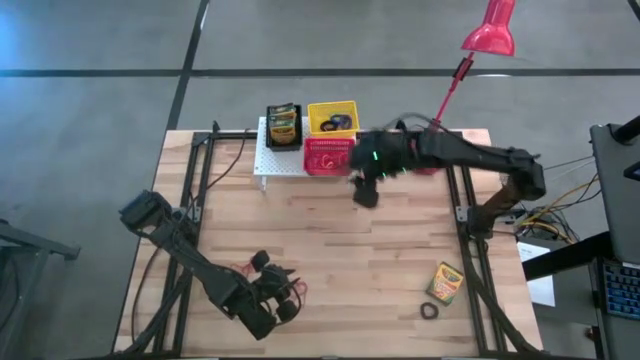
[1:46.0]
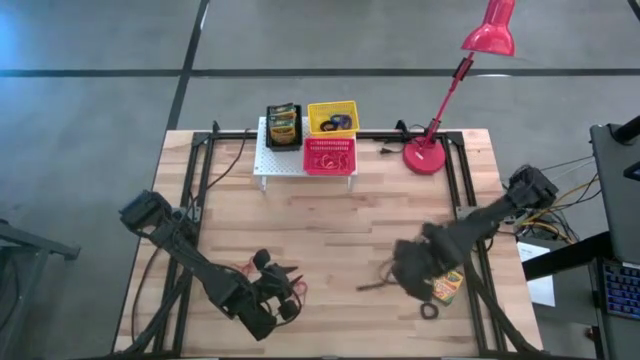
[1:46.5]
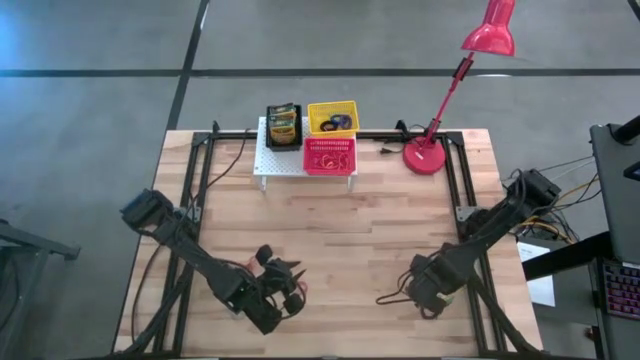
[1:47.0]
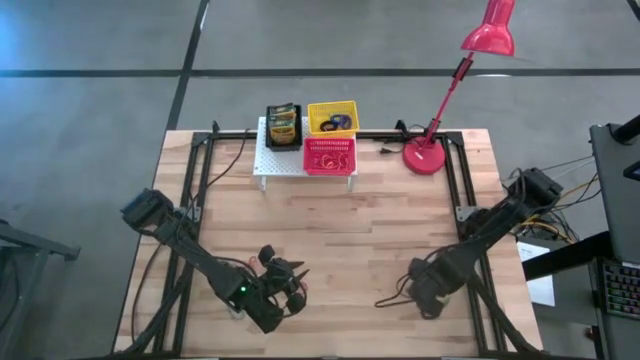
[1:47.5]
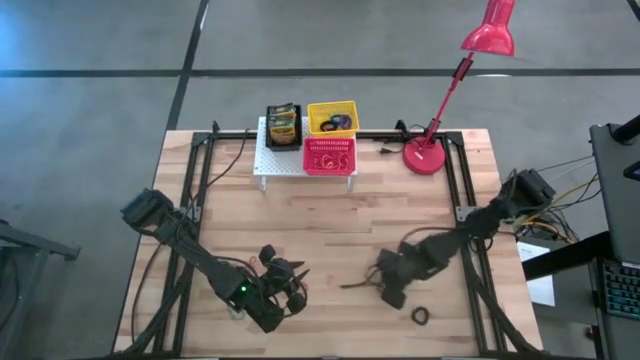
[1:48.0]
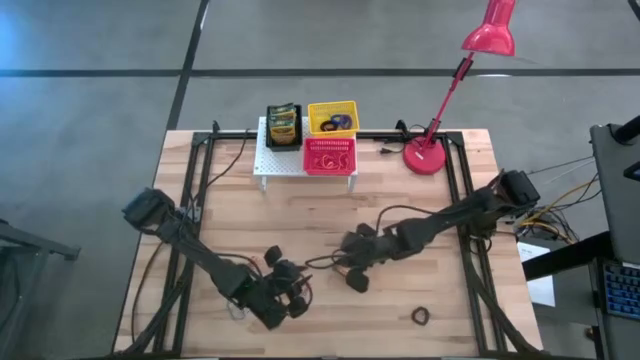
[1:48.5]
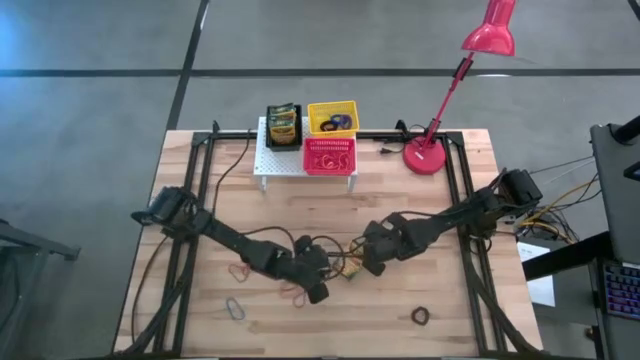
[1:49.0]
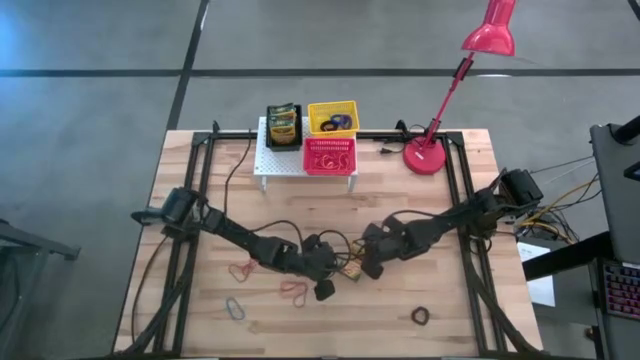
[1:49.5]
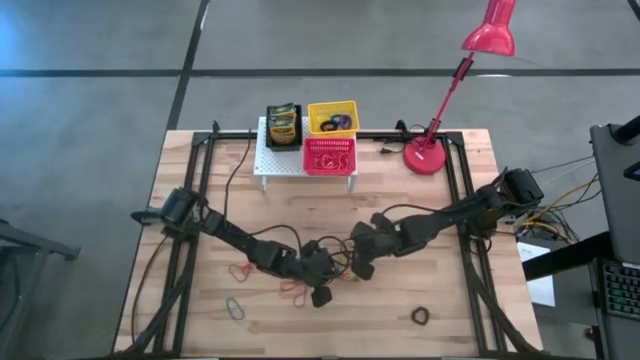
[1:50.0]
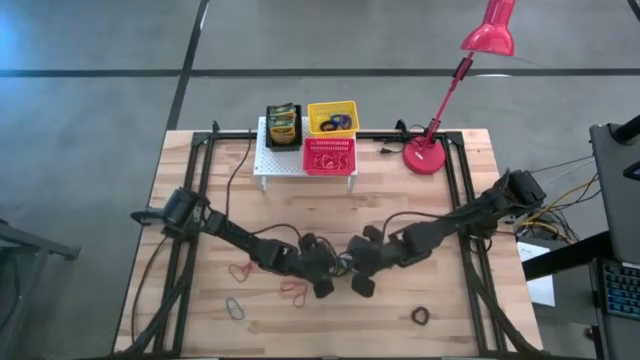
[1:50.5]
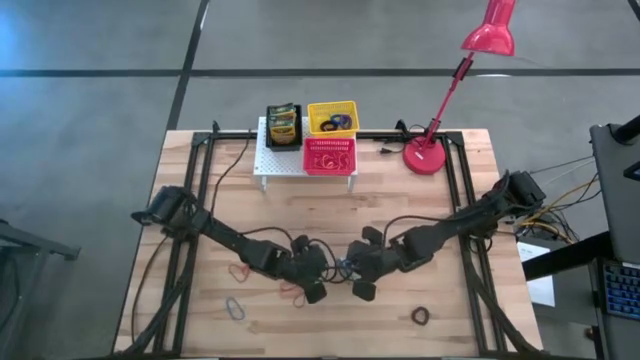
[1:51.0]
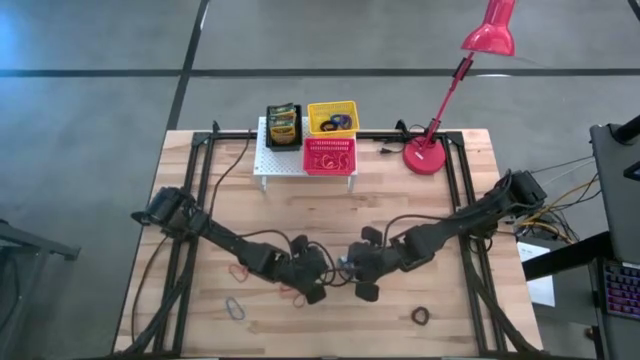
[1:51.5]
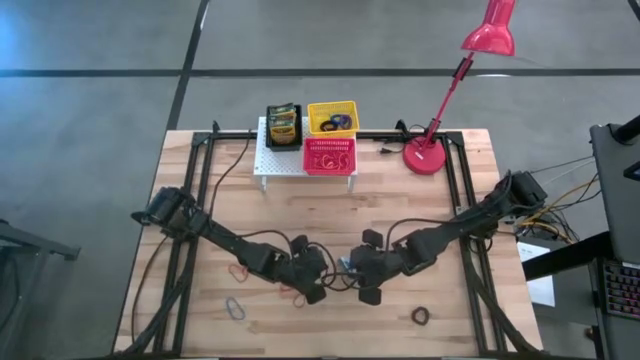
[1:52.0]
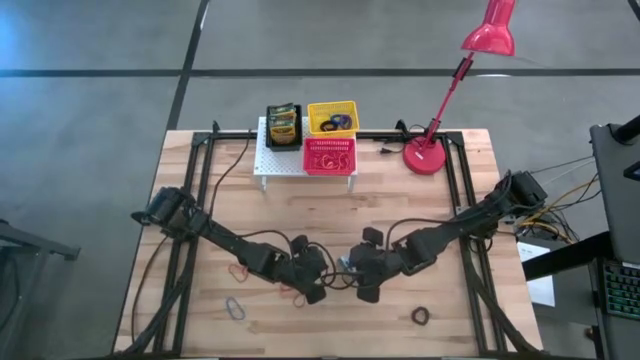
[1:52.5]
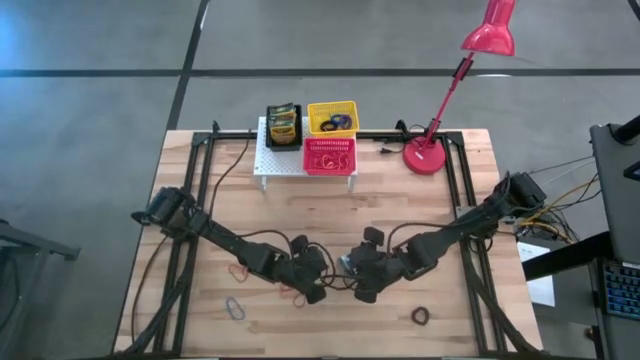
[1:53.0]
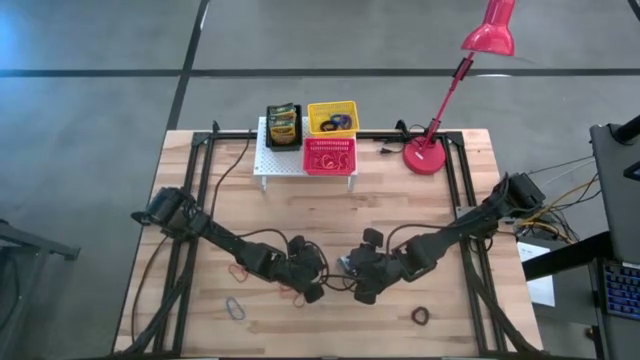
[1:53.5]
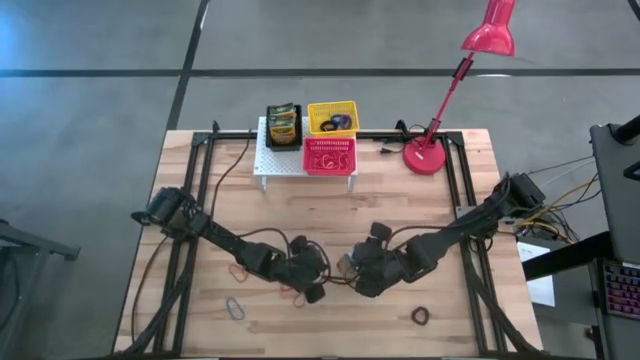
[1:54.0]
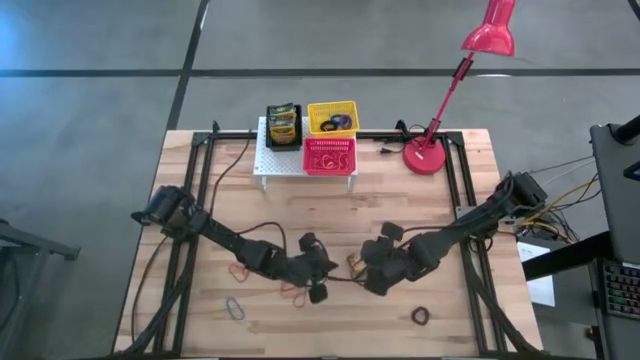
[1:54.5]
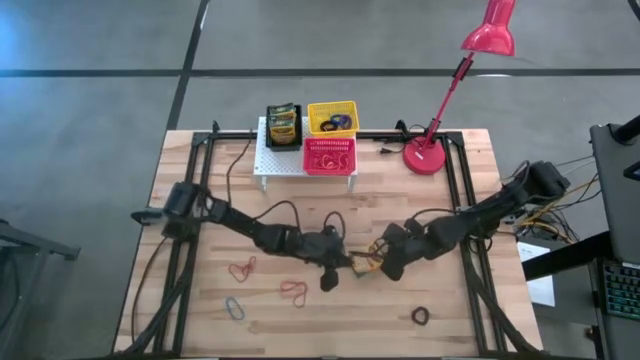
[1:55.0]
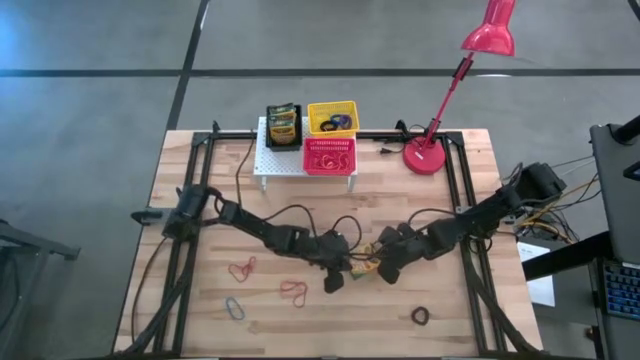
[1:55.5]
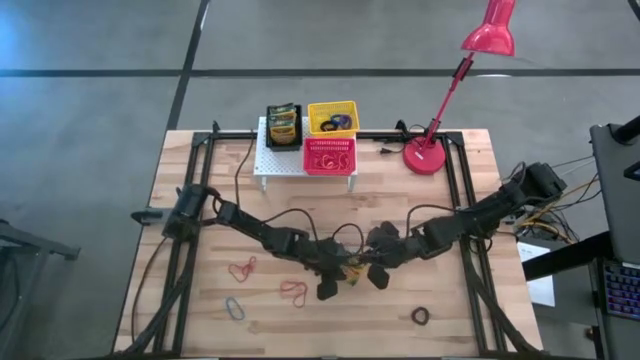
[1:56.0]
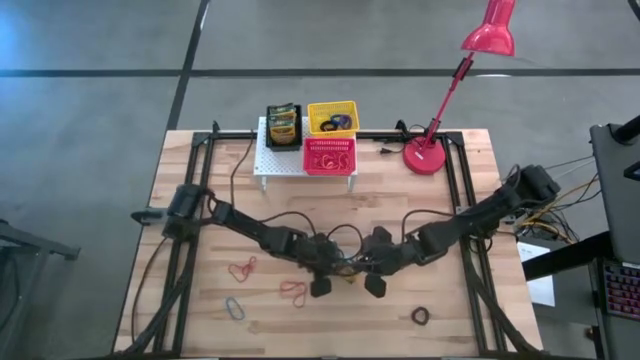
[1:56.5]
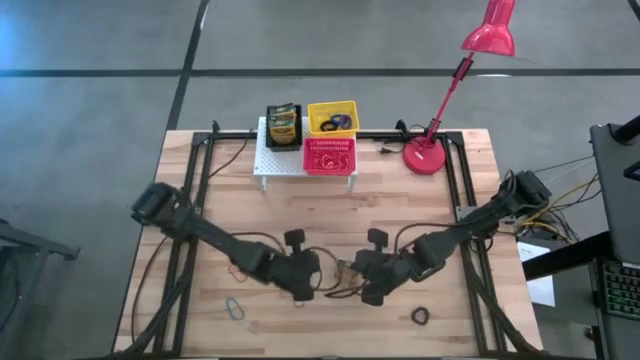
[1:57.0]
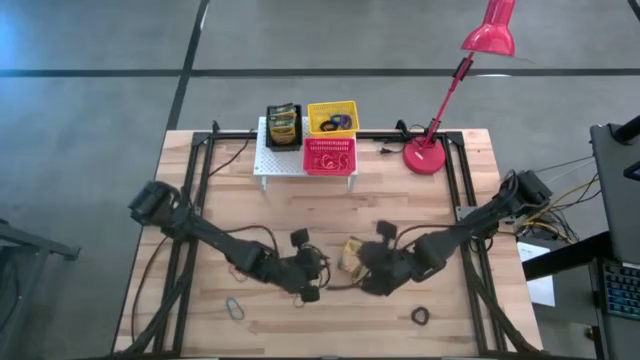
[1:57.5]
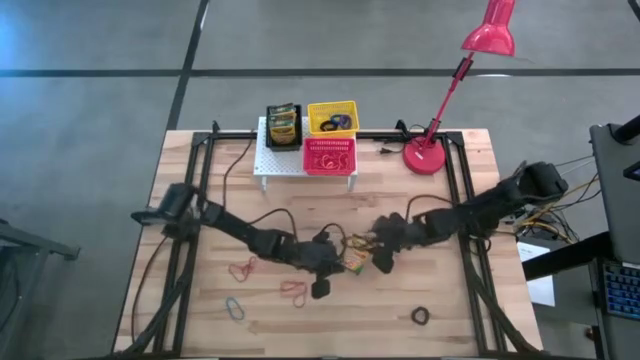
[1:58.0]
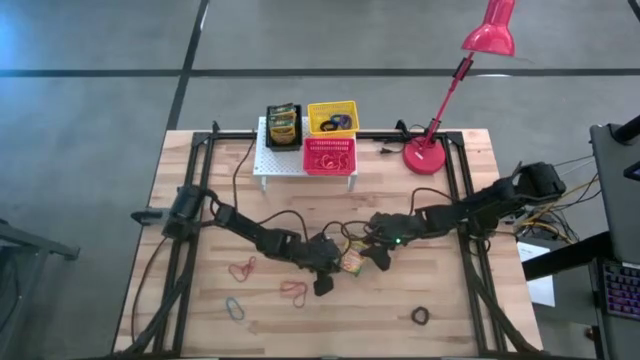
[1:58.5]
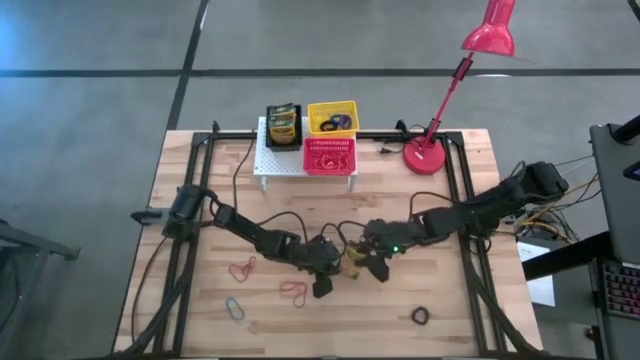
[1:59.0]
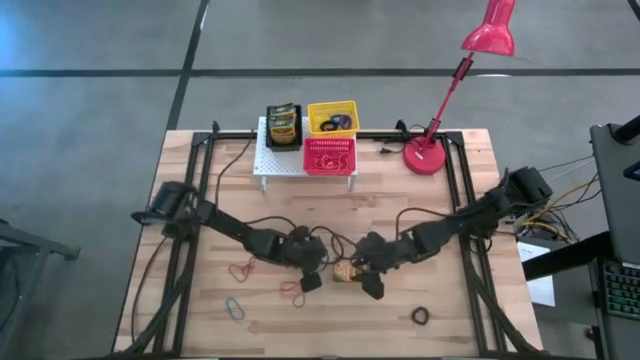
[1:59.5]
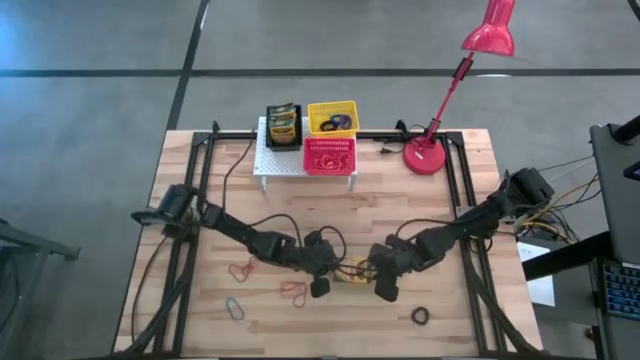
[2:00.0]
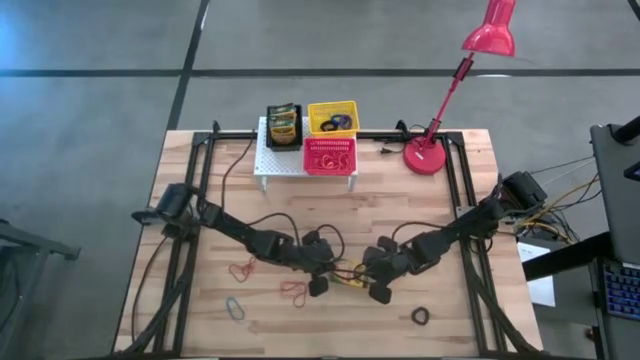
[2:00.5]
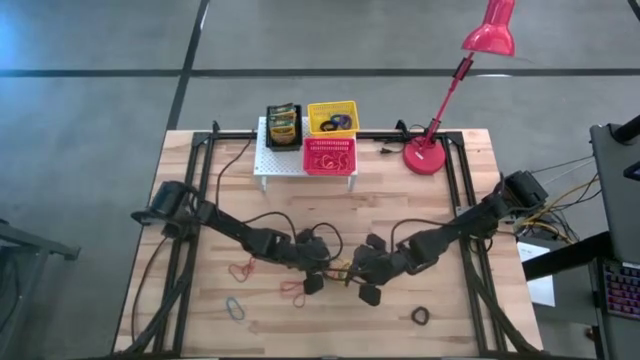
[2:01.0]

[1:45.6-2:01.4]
Task: Pick & Place Office Desk Supplies
Put the crayon box into the black bin on the shelf

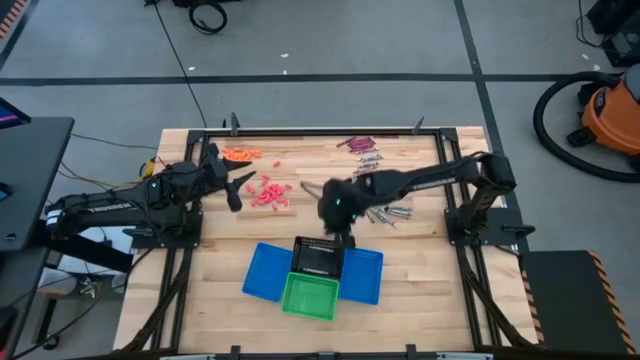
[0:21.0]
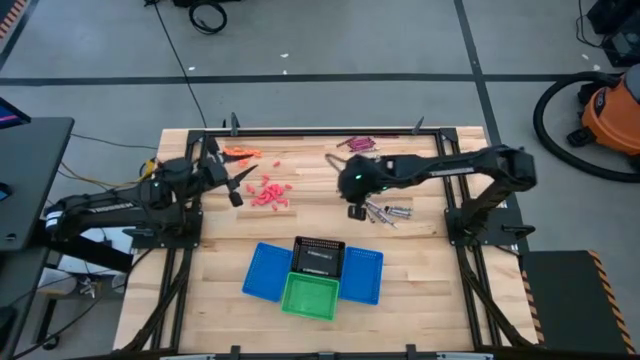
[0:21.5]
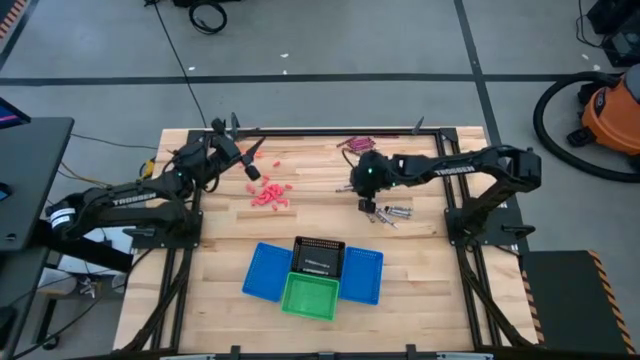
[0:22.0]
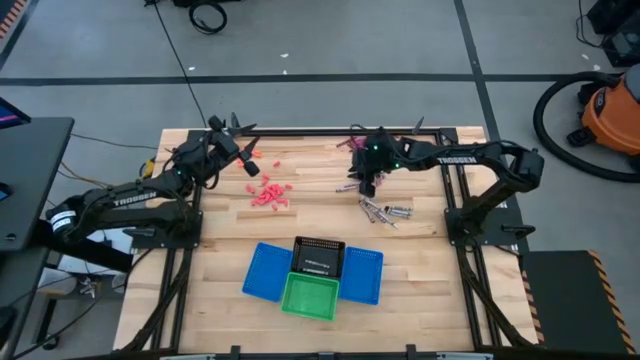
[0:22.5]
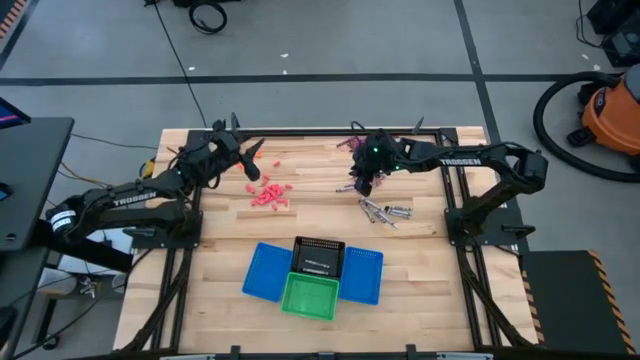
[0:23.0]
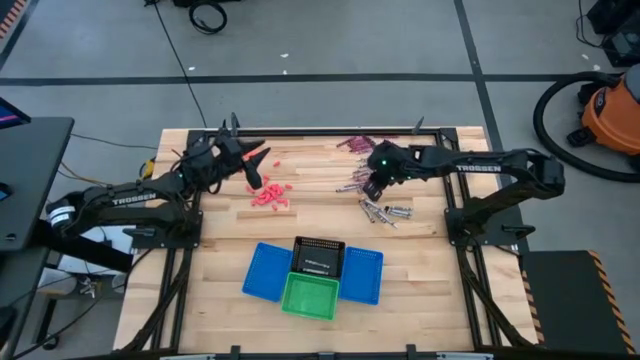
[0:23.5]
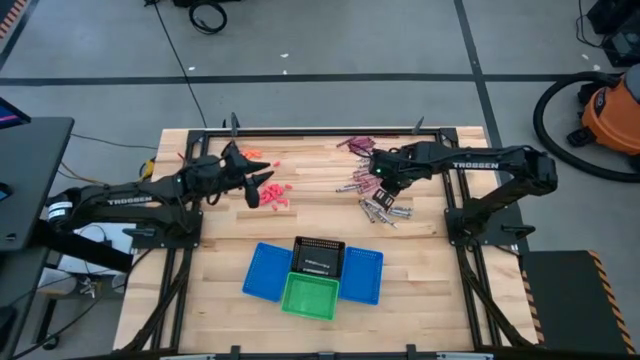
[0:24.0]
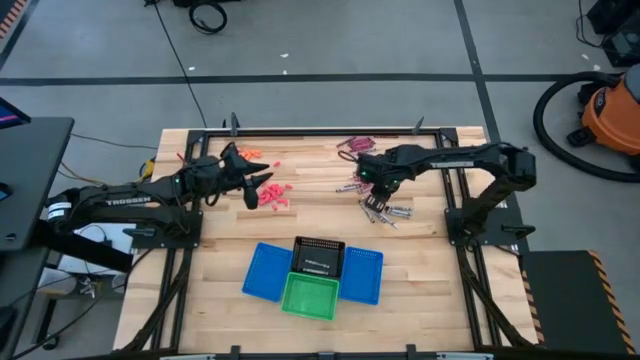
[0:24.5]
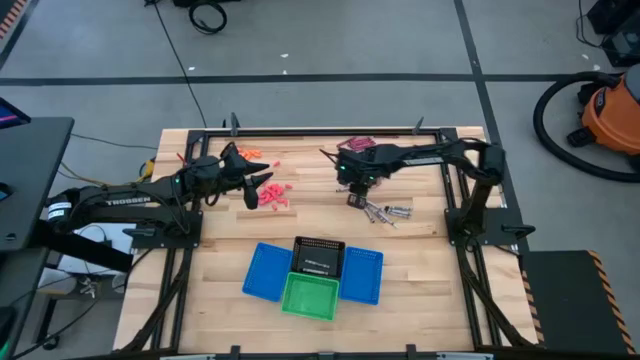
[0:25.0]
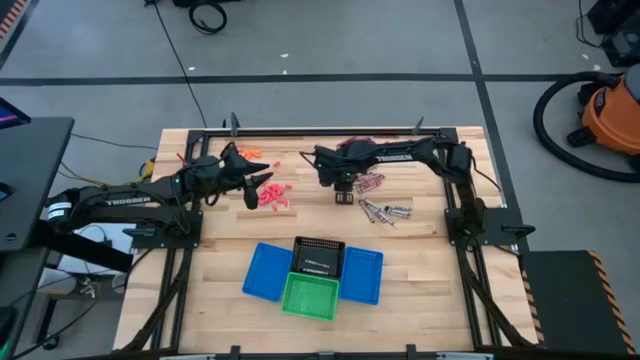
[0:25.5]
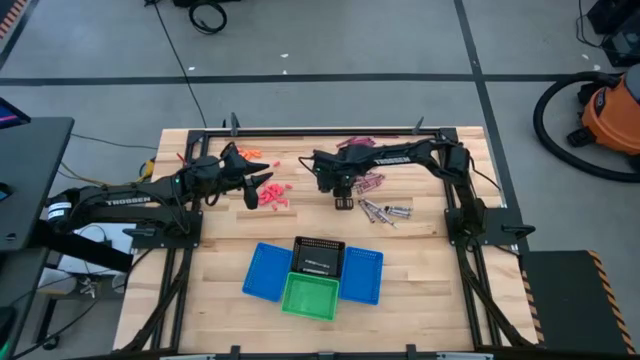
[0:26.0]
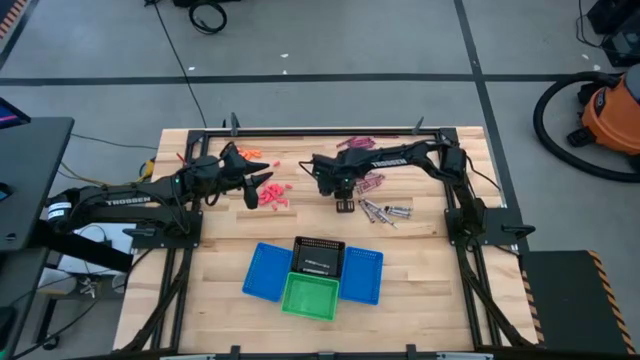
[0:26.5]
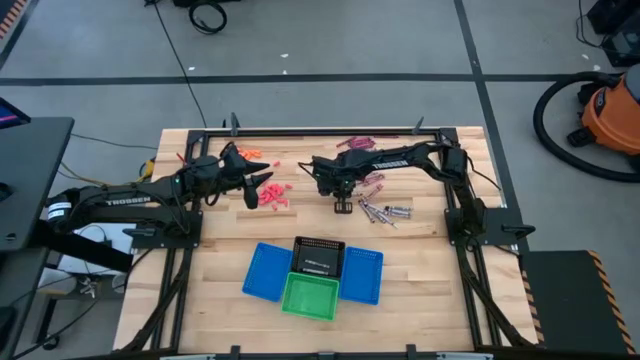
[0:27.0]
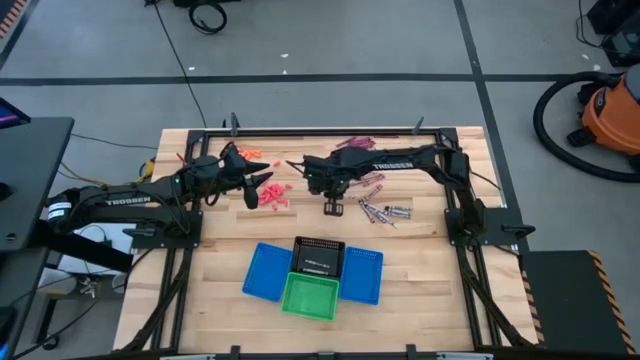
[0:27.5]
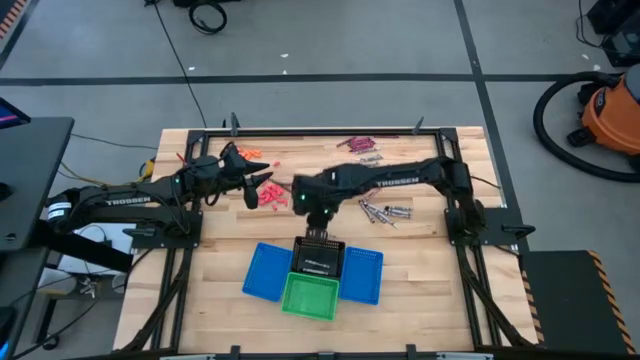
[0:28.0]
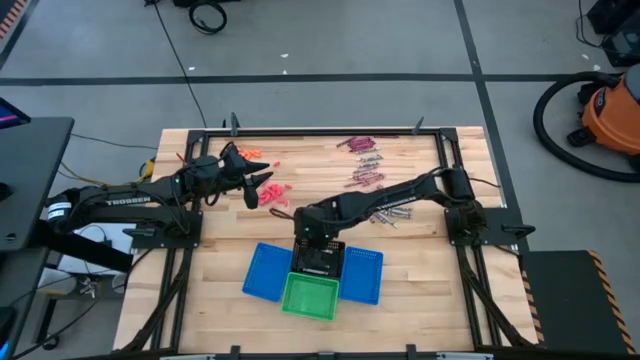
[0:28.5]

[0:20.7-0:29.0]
Task: Sort crayons
Put the black crayon into the black bin
